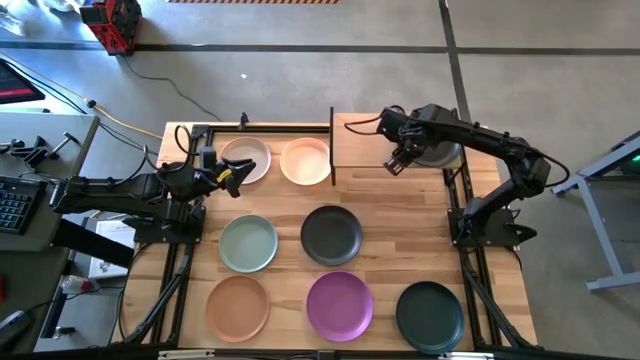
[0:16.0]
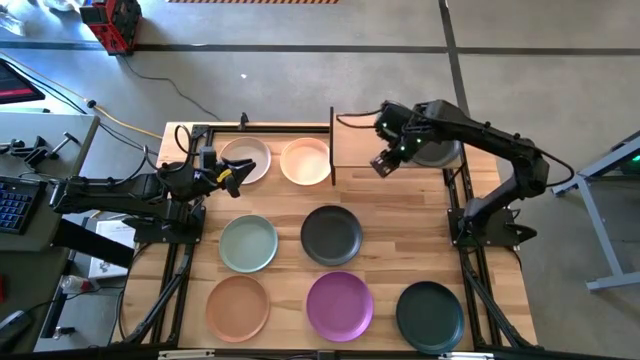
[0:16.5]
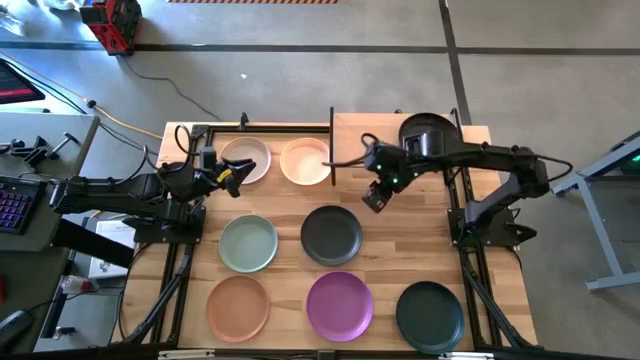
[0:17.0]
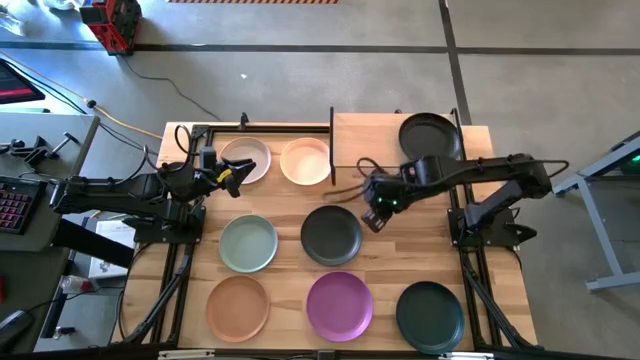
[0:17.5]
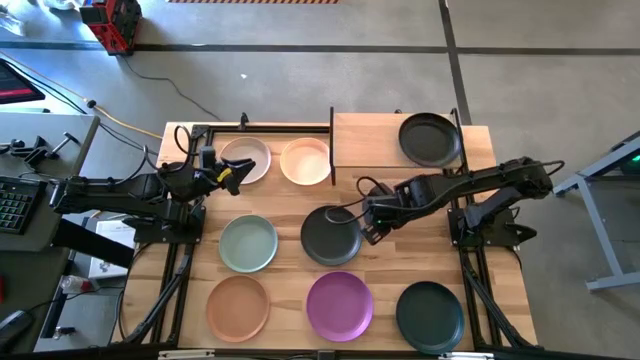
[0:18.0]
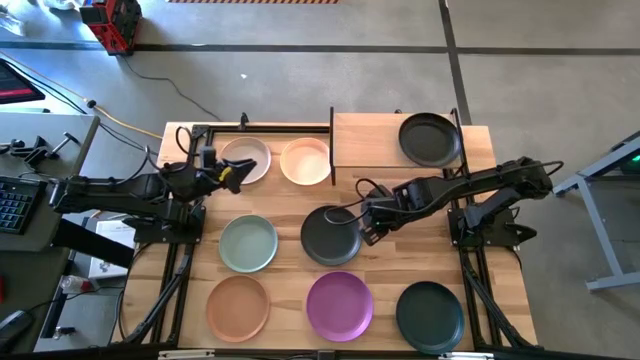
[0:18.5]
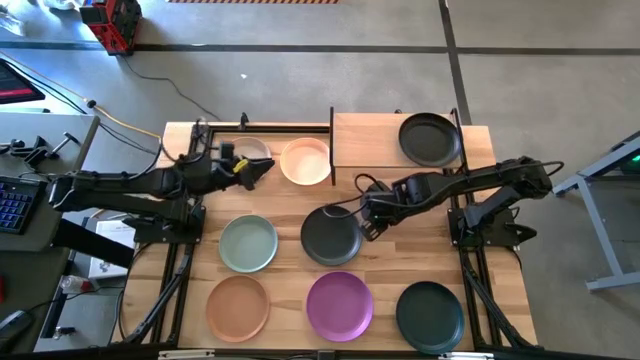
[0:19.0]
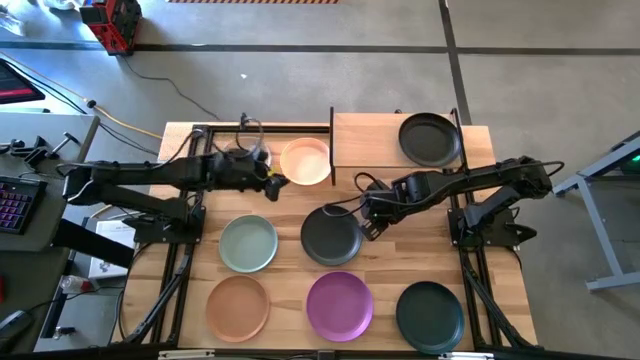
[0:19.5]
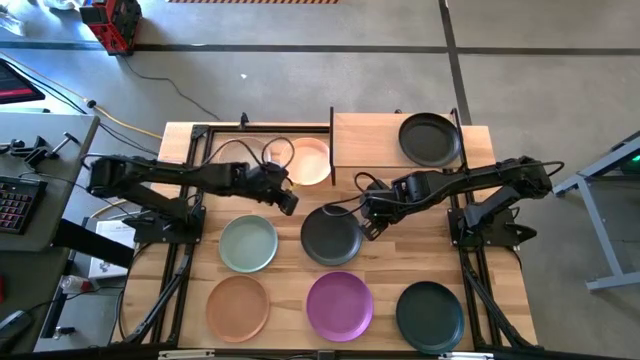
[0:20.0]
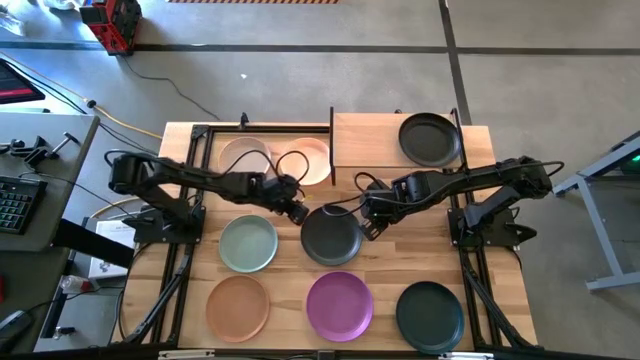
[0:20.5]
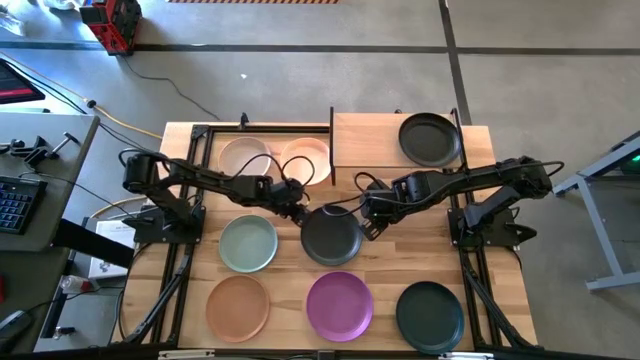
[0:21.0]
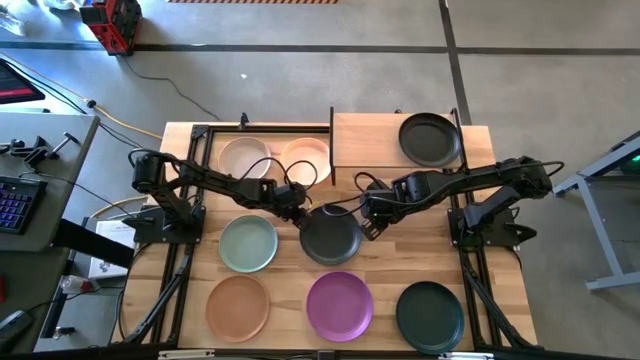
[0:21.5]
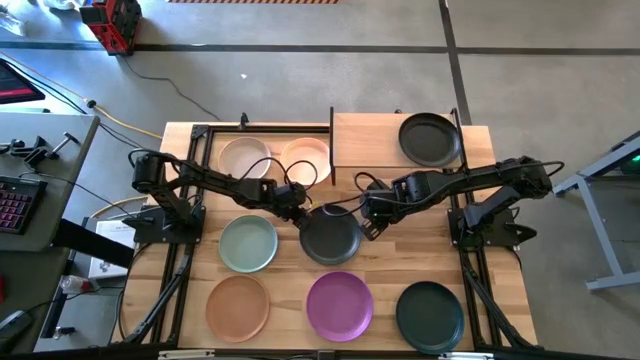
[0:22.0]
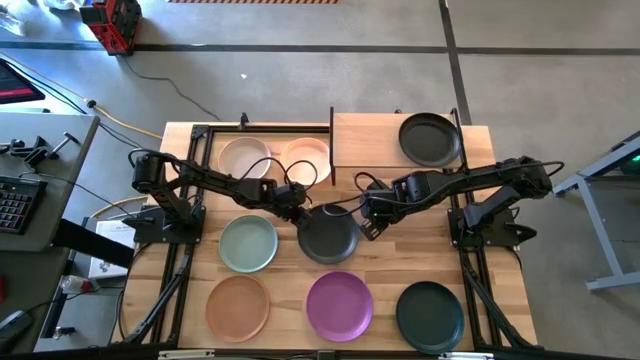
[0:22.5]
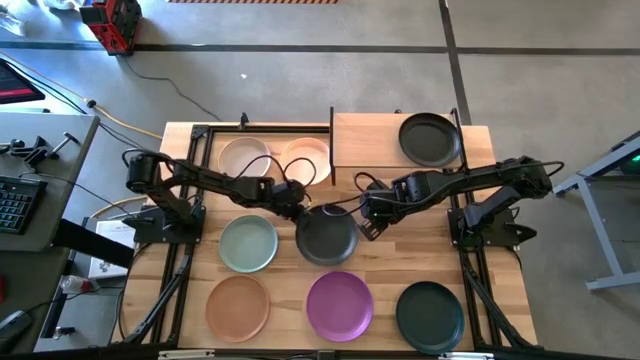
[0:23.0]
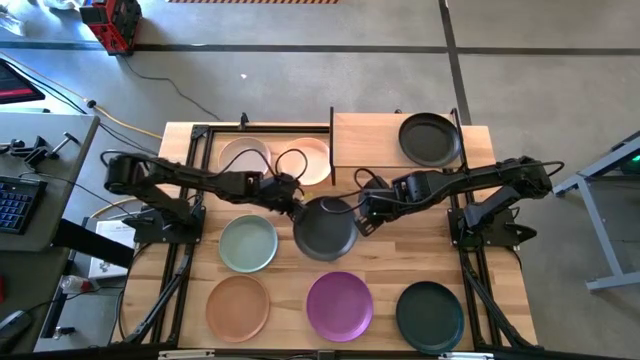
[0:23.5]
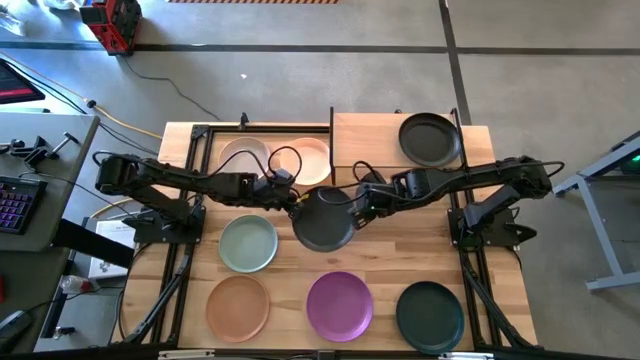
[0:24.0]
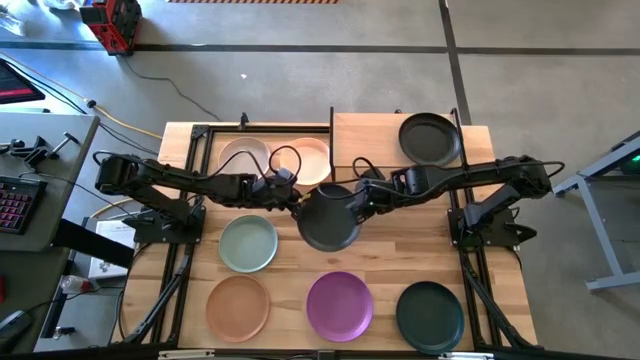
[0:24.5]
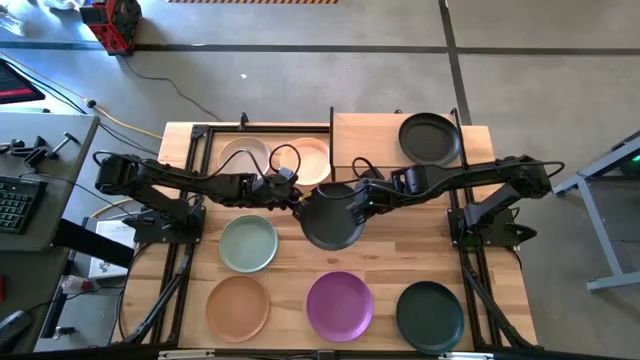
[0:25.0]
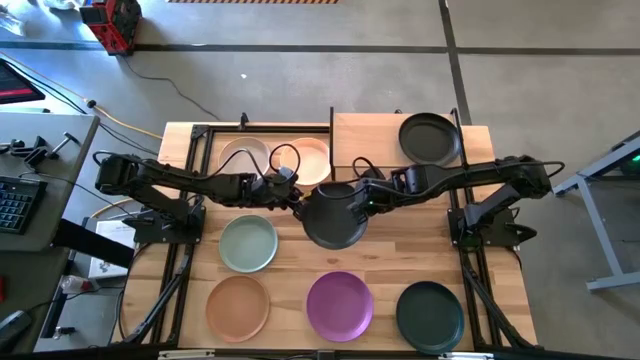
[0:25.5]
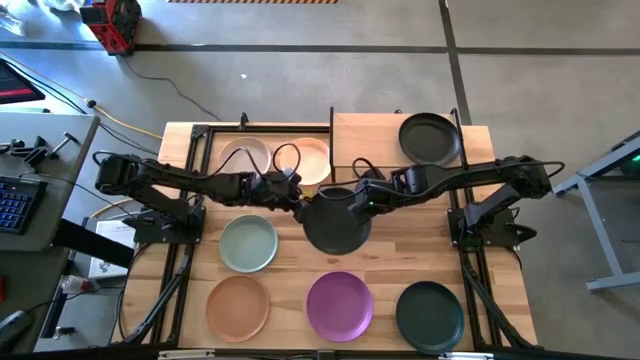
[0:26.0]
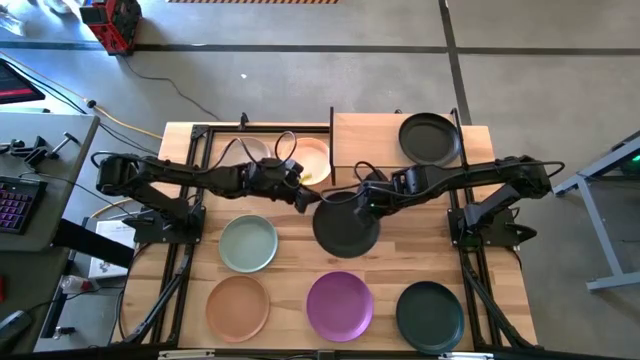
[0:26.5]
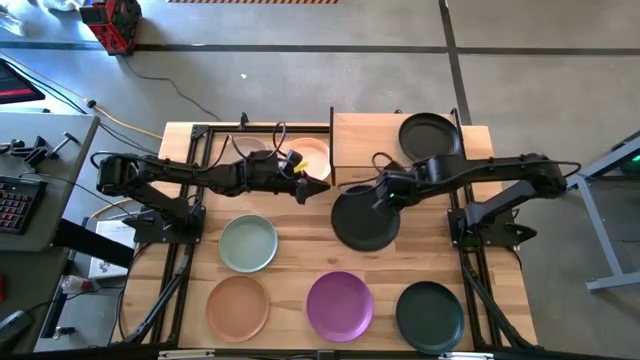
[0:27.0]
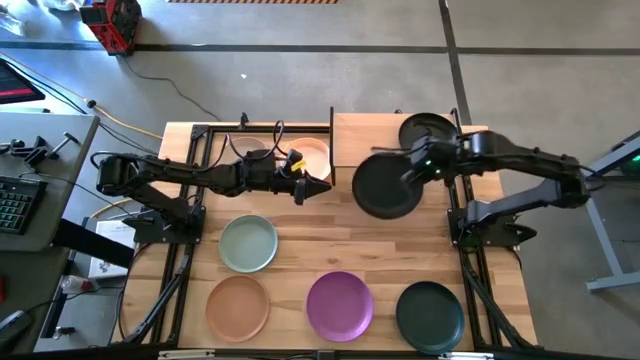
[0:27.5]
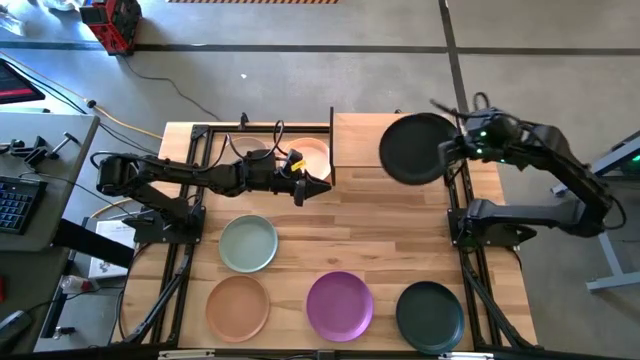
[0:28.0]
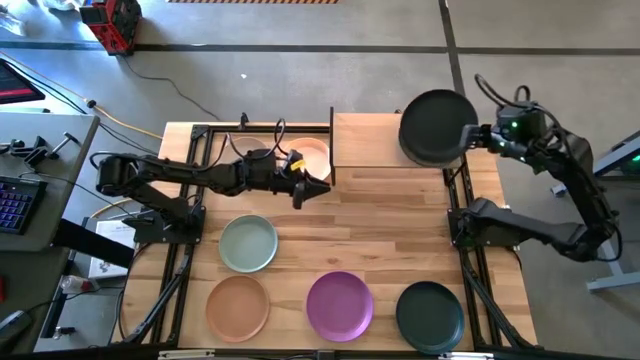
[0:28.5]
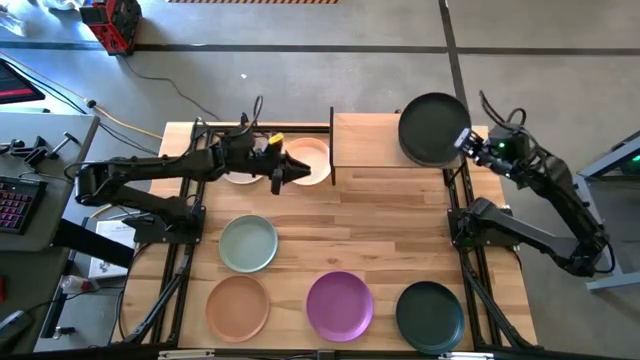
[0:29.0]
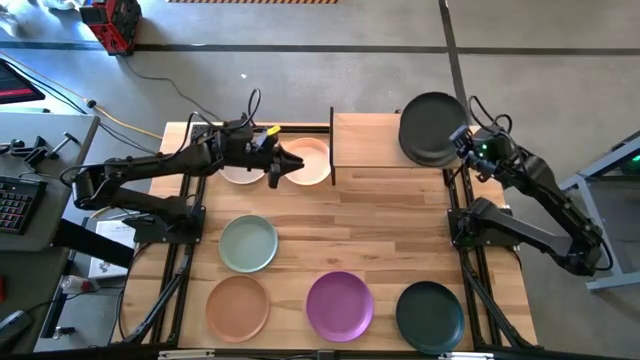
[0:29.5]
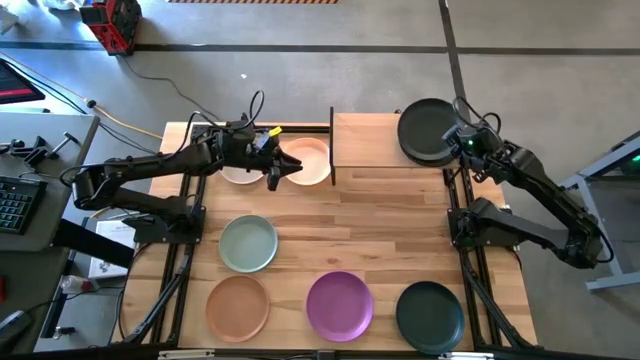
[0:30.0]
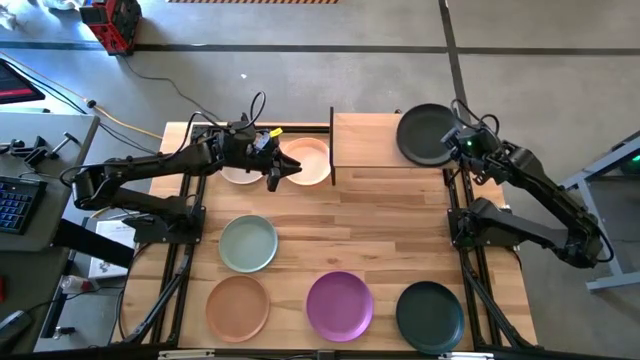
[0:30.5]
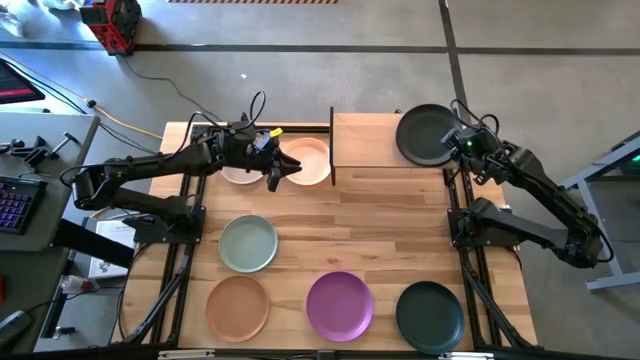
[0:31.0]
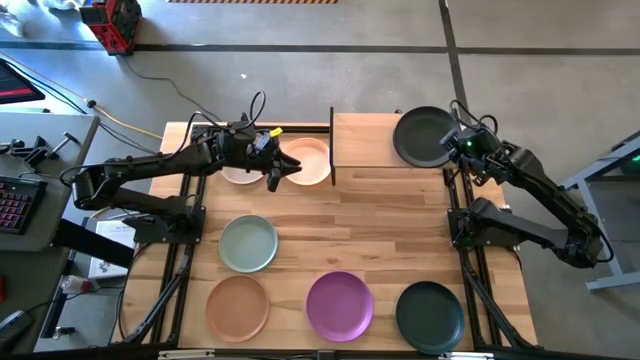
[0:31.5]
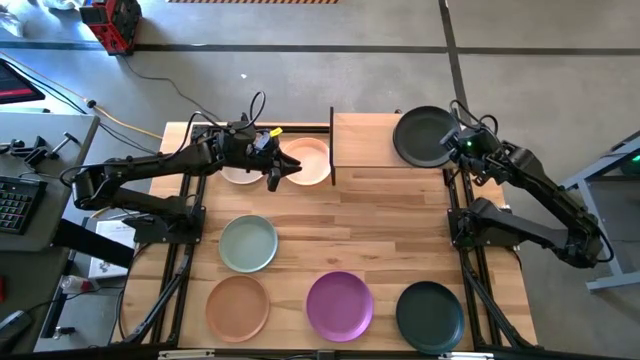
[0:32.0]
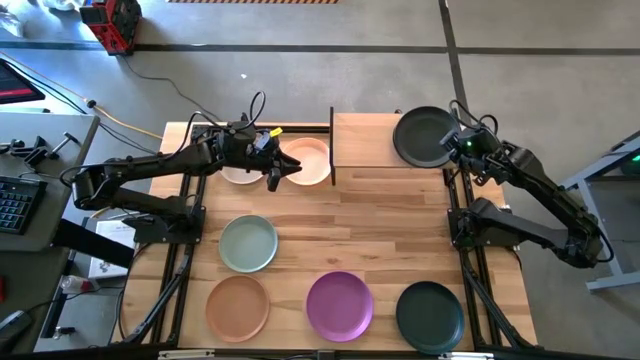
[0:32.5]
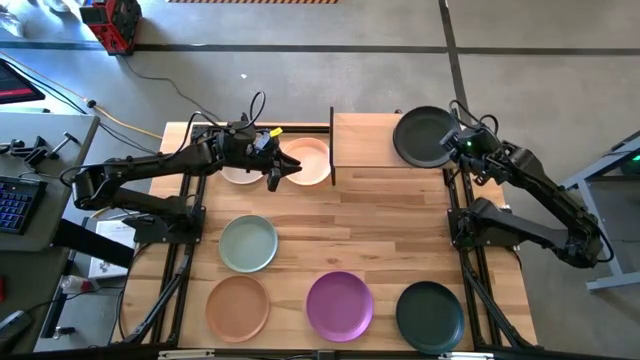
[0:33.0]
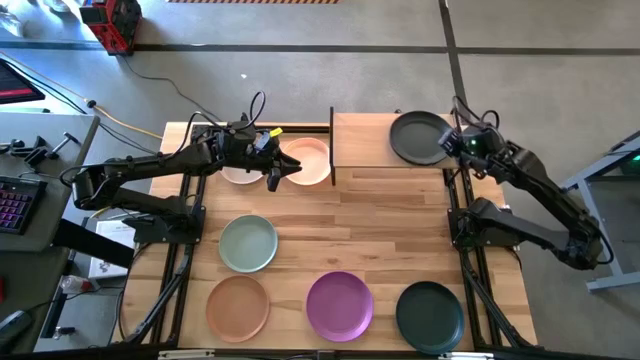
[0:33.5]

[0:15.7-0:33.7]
Task: Place and stack plates onto a shelf
Stack the top black plate on top of the black plate on the shelf

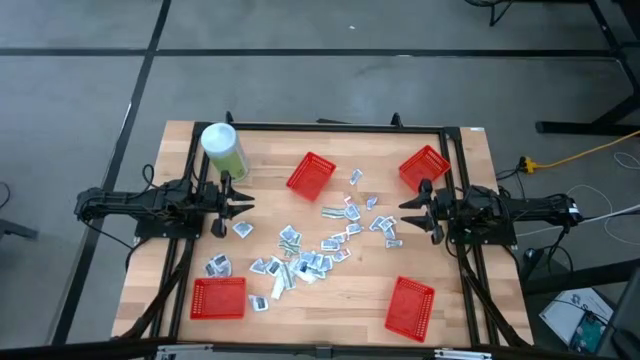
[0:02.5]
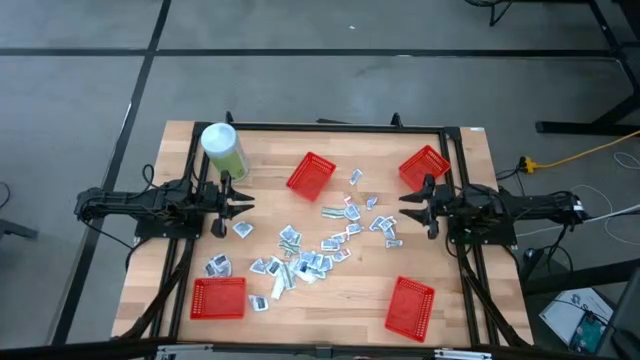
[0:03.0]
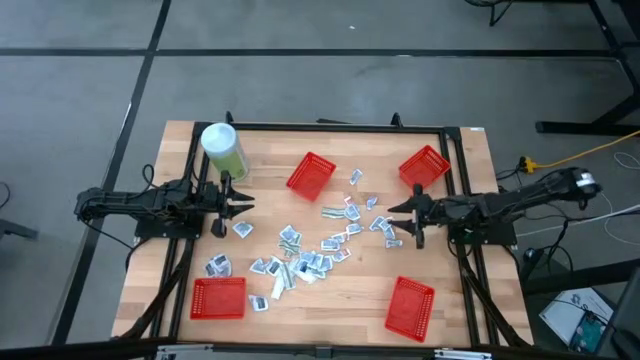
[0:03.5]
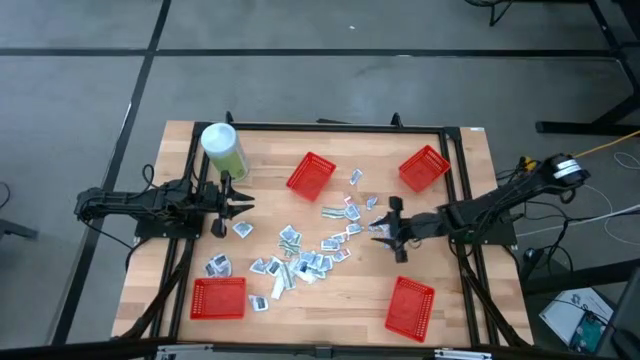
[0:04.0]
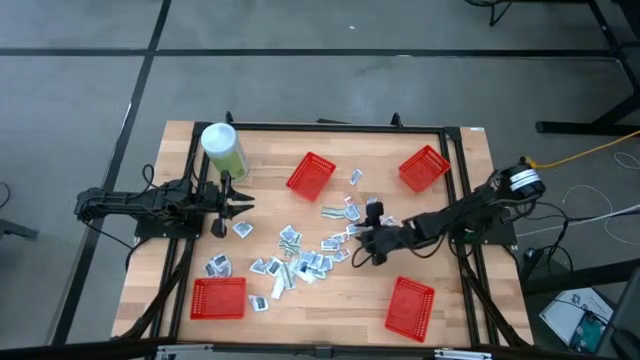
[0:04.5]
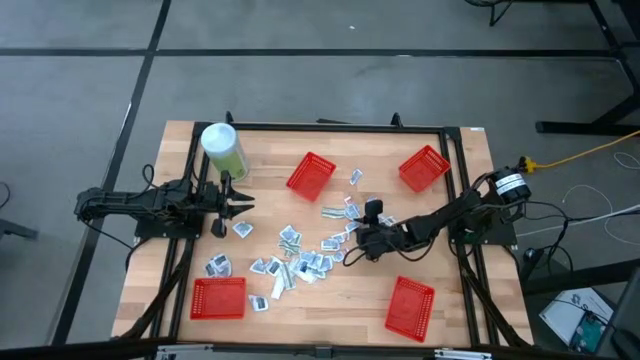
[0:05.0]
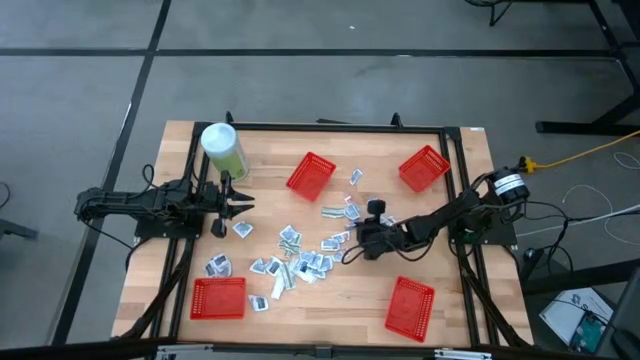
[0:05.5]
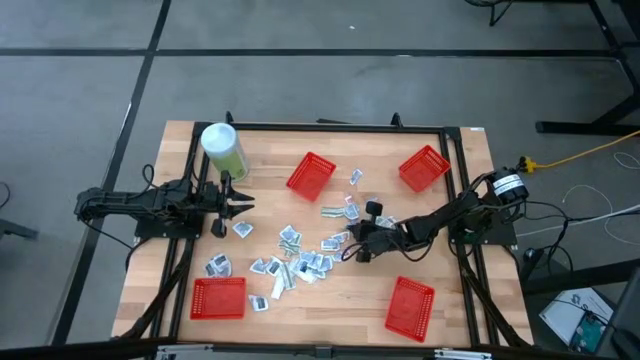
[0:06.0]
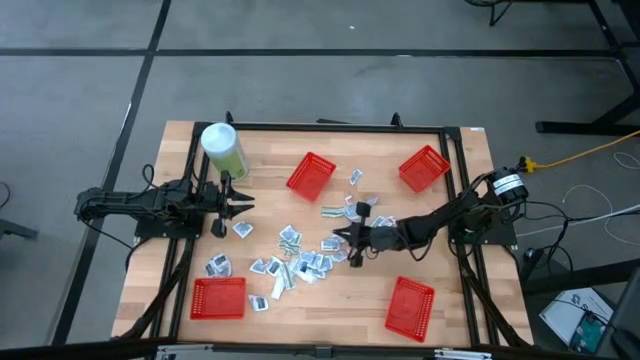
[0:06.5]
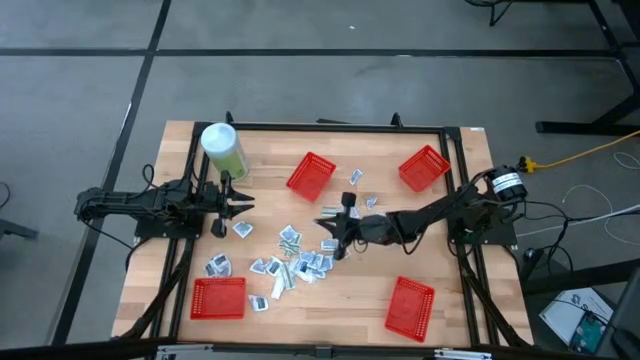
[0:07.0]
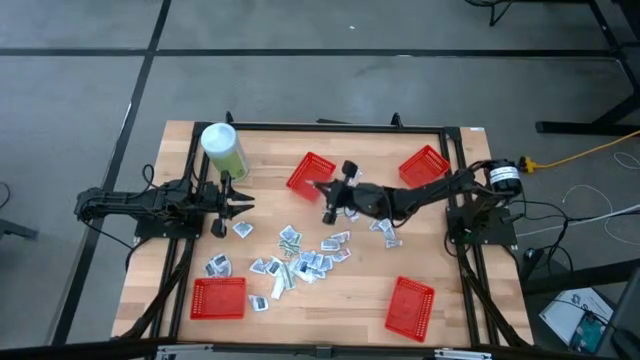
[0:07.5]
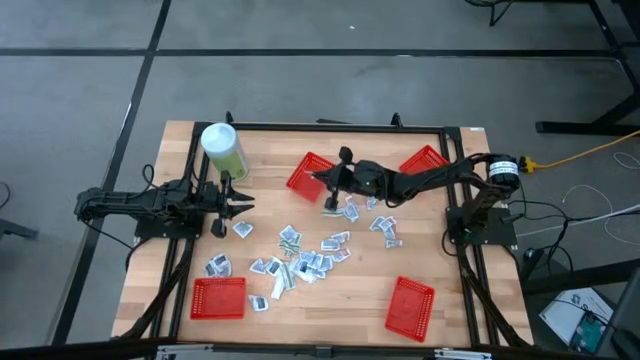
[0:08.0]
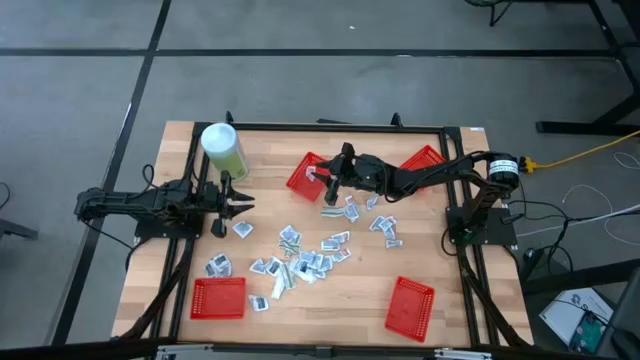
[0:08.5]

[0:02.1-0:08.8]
Task: Pick & Place First Aid Supplies
Put the orange ointment pack into the red container
